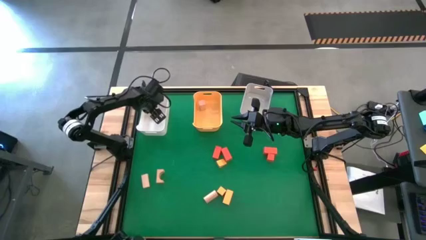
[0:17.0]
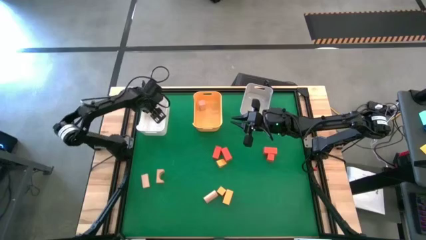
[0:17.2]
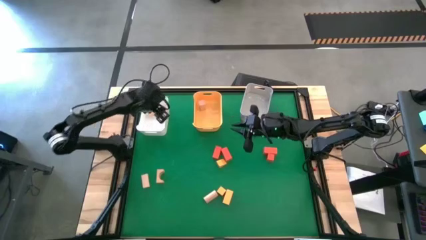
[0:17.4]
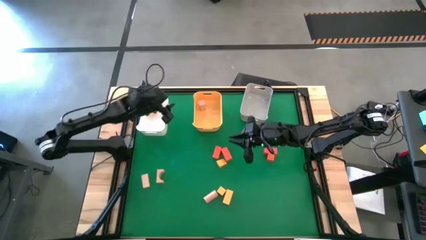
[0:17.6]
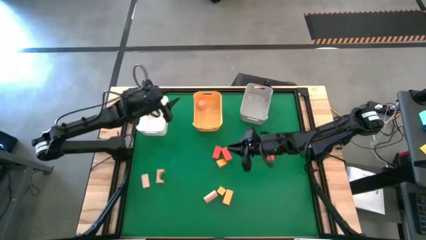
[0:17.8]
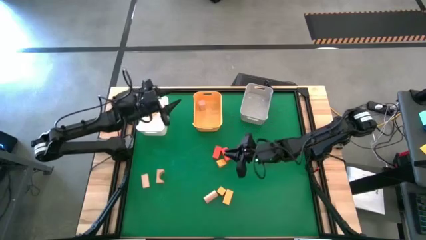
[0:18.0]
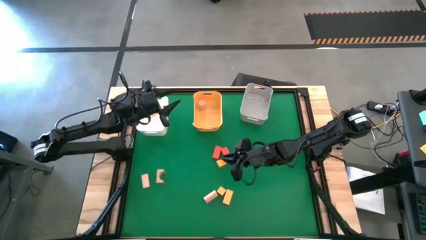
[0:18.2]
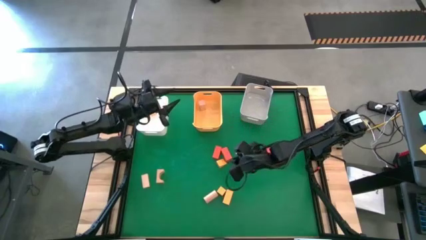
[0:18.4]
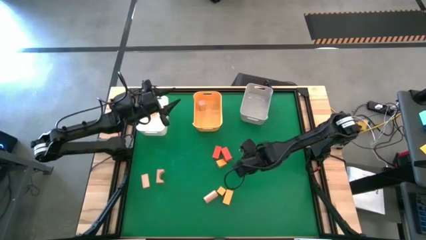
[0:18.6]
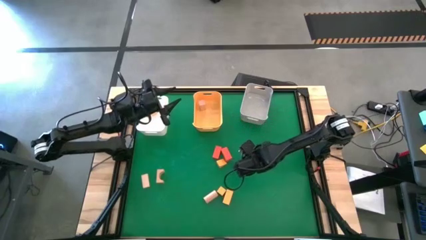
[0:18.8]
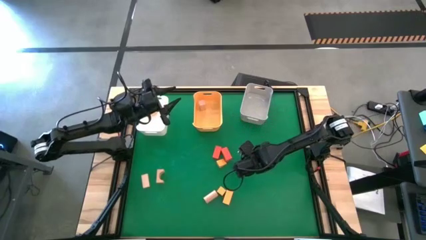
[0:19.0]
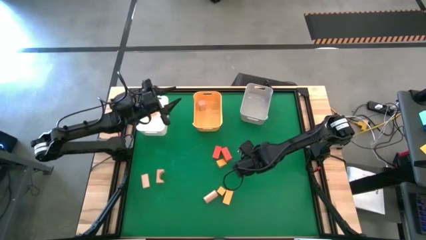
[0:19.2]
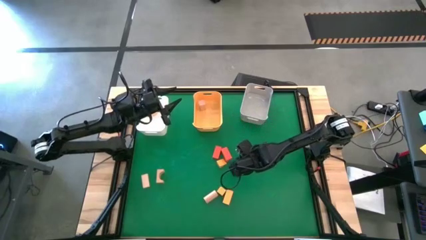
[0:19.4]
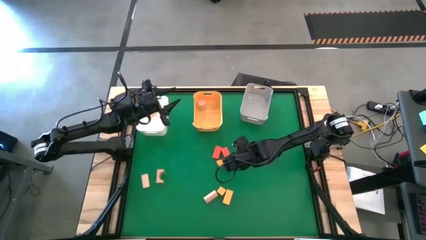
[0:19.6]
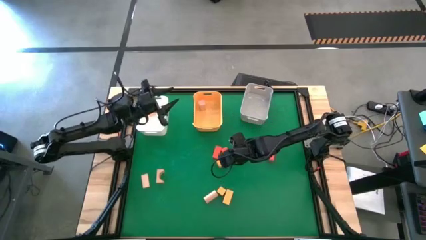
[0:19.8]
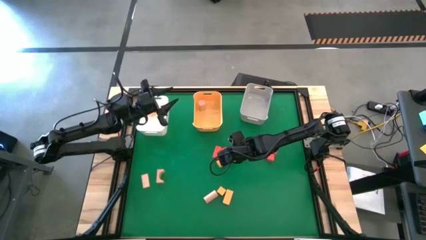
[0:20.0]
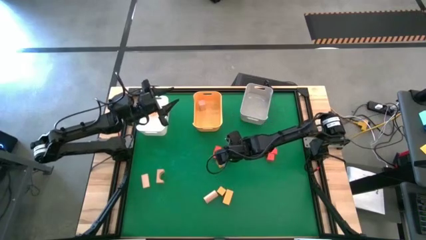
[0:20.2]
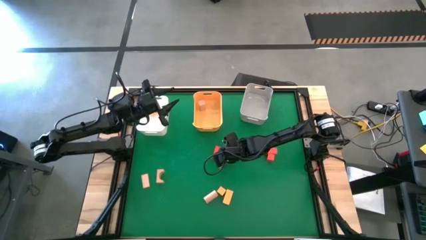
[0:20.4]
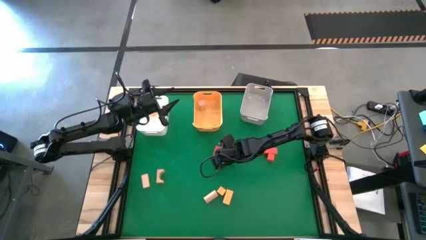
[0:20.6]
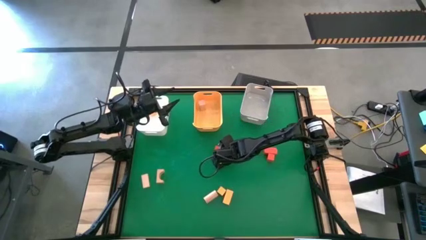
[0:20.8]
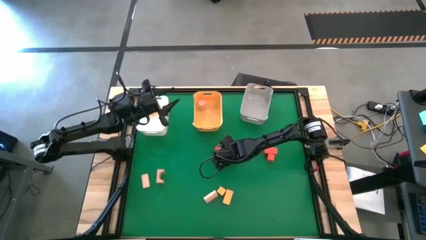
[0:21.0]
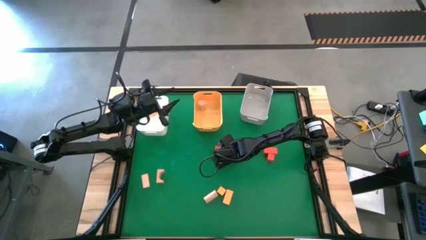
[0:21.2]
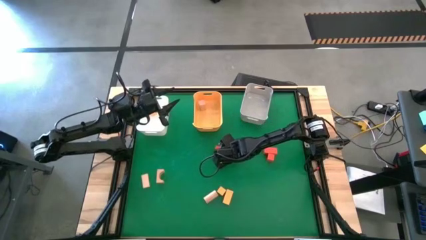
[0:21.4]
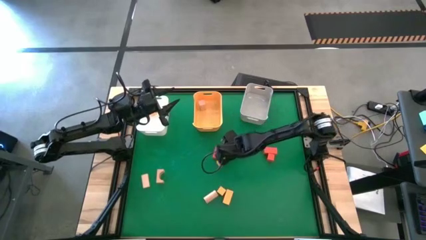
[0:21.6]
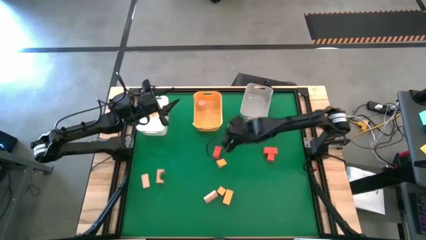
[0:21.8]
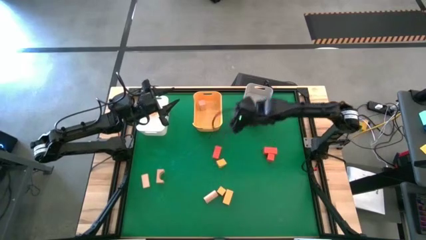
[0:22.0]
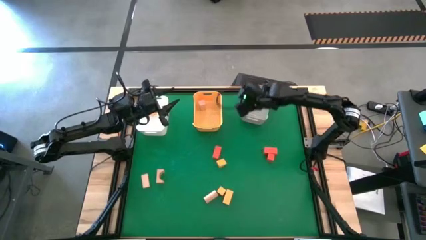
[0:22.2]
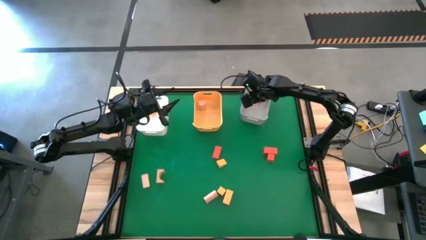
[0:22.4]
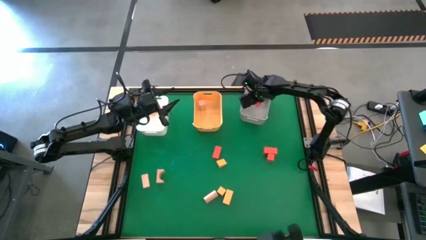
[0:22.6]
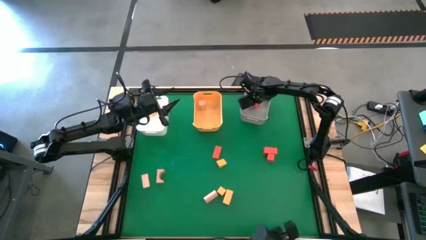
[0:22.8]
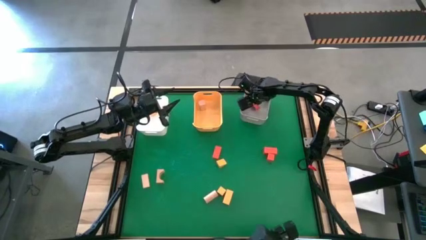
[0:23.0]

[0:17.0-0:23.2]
Task: Sort & place blocks by color
Put the orange block into the light gray bin

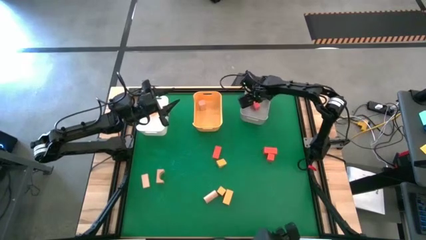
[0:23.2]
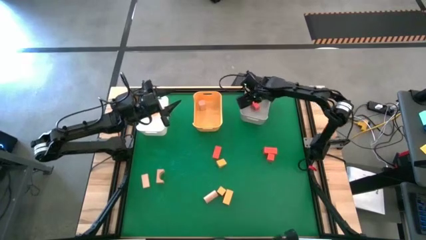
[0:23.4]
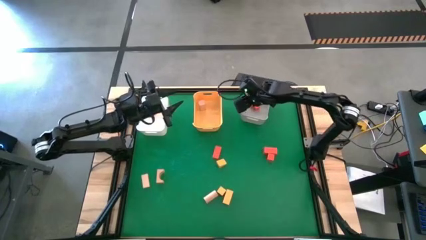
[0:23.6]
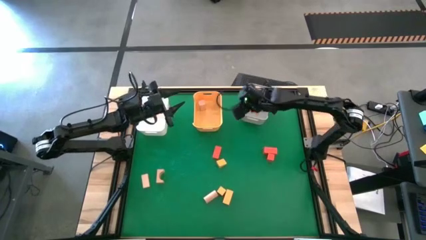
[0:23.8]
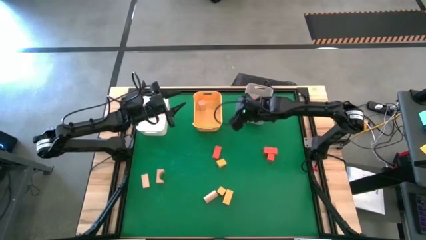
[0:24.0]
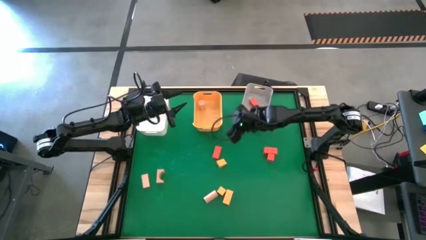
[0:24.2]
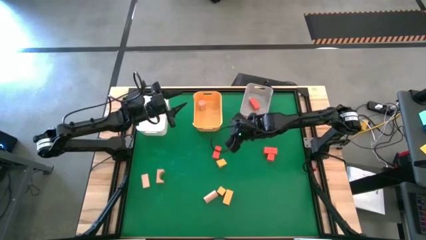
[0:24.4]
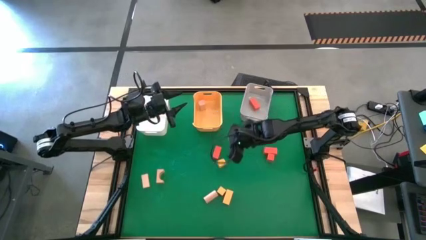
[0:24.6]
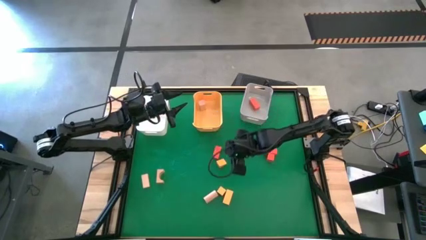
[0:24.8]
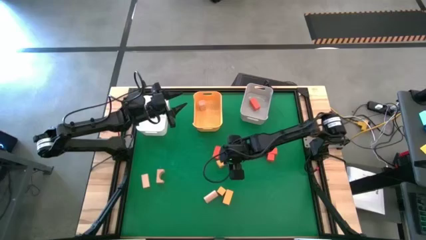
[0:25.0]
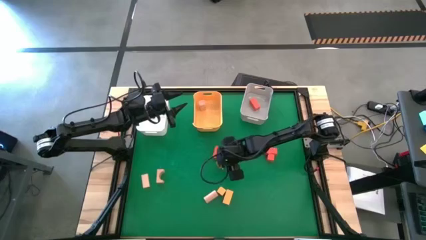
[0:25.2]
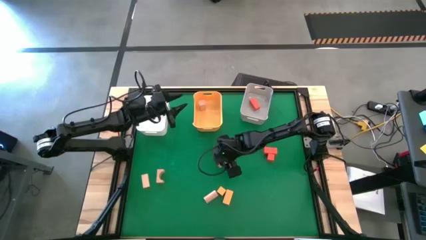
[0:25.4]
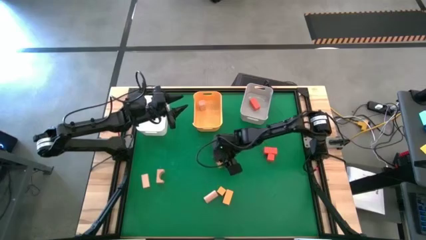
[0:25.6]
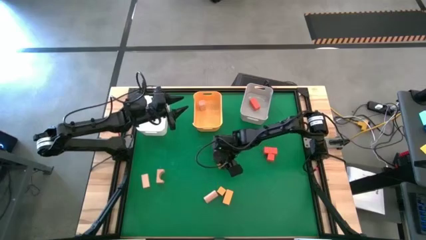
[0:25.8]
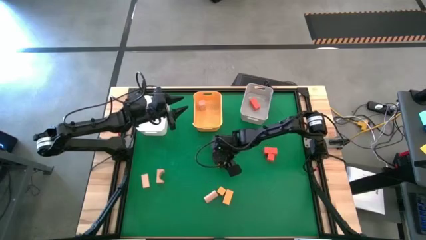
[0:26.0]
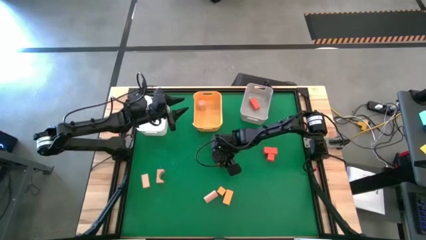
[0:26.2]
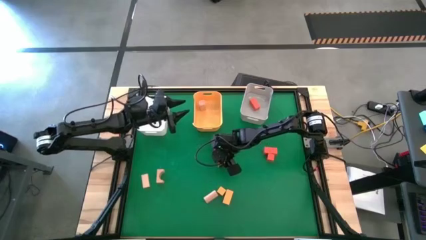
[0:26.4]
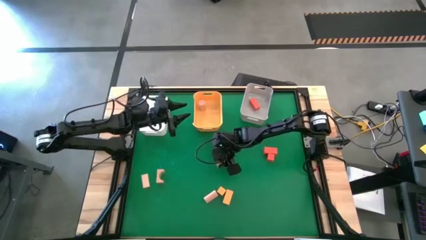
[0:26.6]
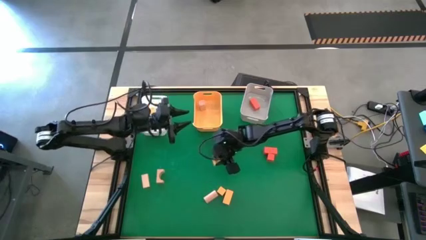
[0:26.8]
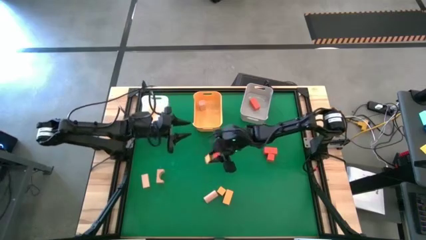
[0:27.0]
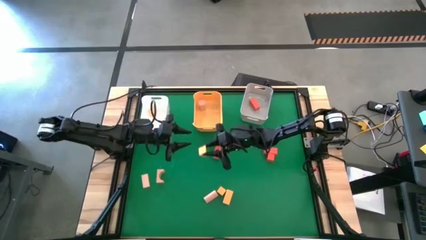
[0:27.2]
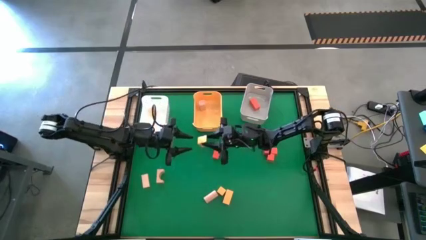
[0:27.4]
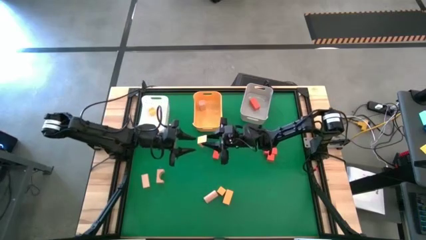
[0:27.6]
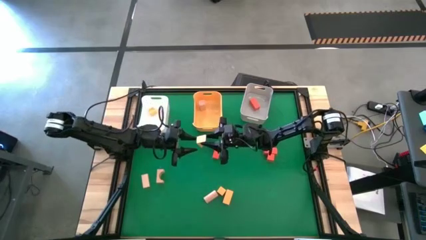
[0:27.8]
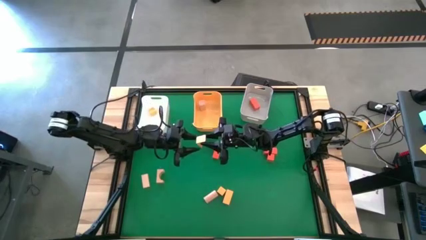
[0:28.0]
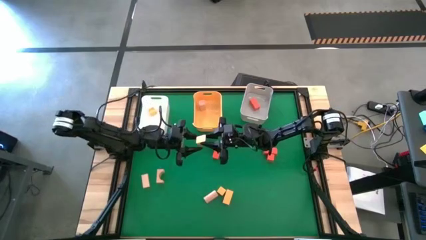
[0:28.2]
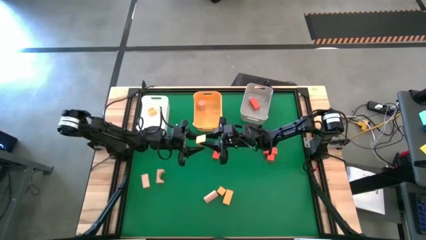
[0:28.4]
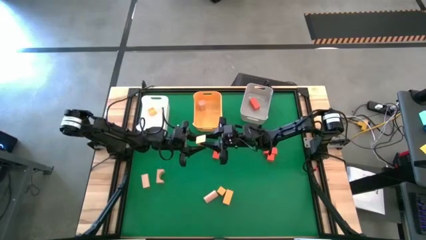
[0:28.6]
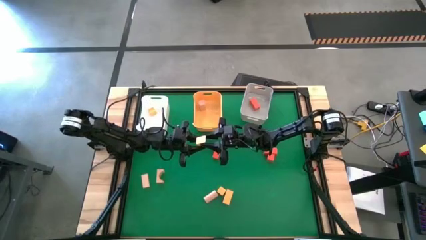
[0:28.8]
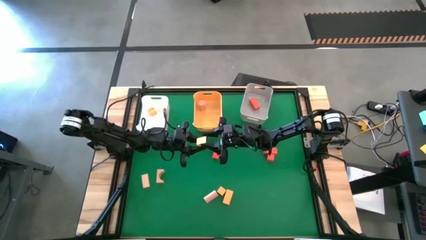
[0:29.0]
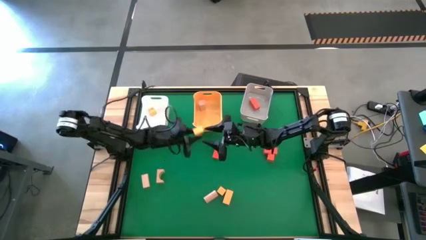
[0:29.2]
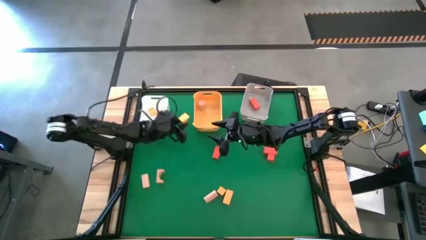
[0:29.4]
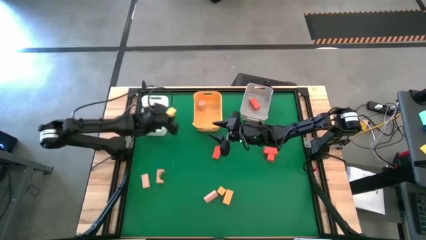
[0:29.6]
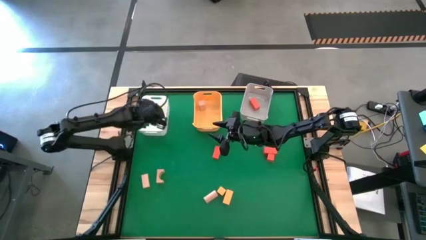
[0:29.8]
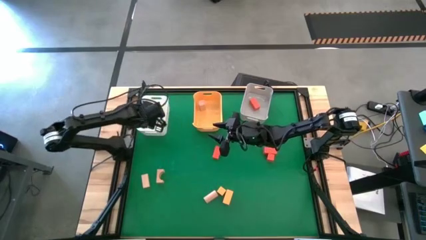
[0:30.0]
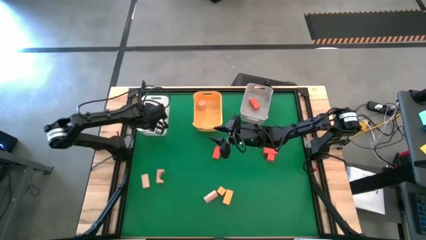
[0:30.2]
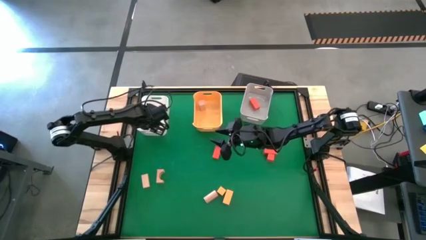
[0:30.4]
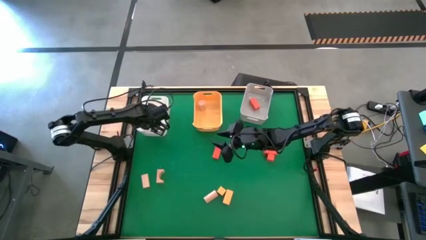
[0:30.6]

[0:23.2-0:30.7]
Put the yellow block into the white bin

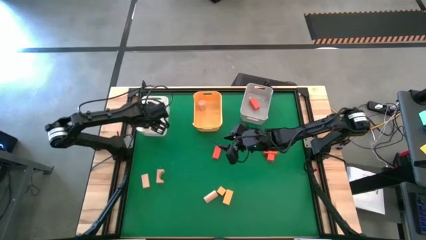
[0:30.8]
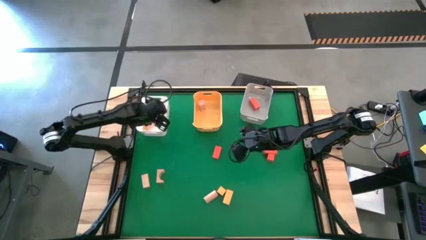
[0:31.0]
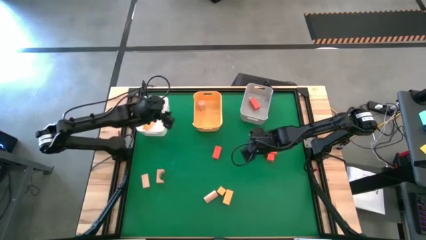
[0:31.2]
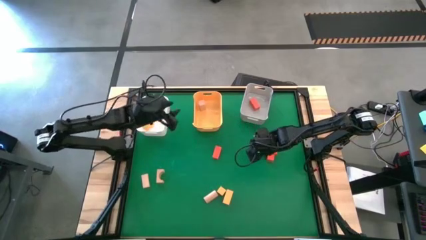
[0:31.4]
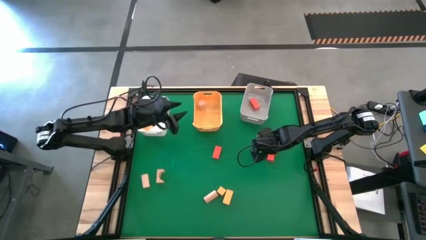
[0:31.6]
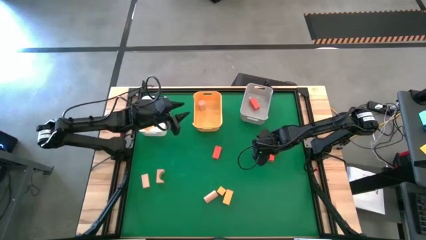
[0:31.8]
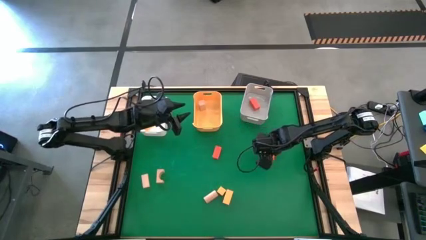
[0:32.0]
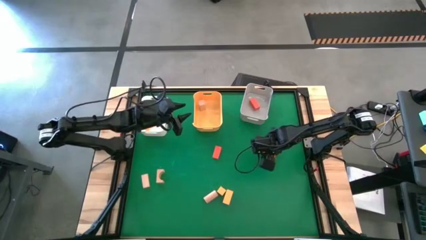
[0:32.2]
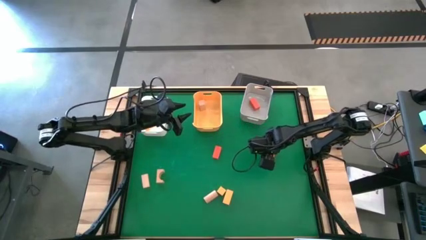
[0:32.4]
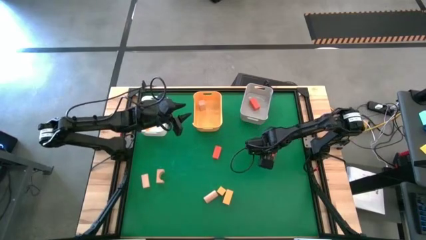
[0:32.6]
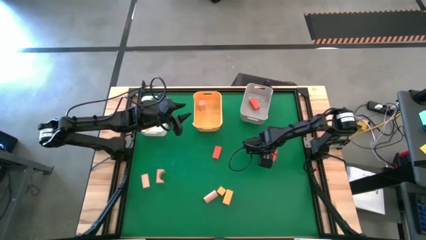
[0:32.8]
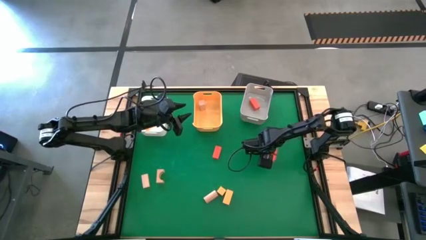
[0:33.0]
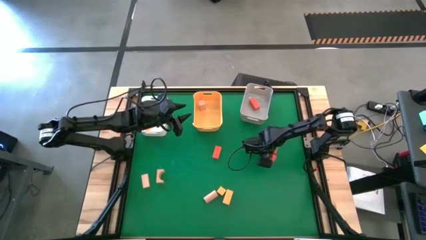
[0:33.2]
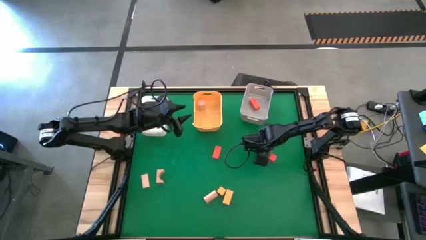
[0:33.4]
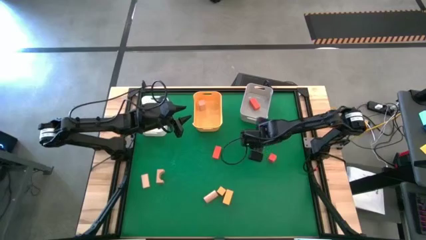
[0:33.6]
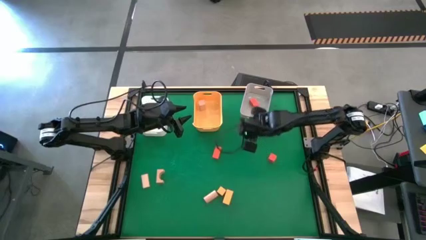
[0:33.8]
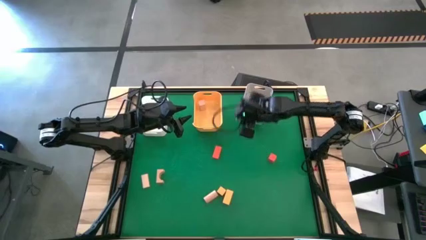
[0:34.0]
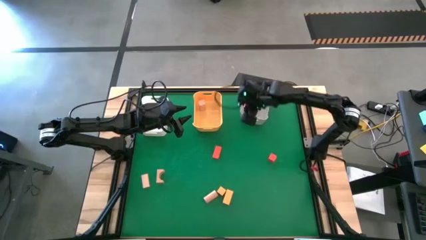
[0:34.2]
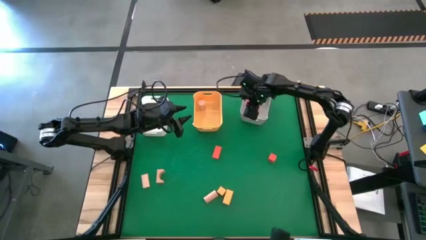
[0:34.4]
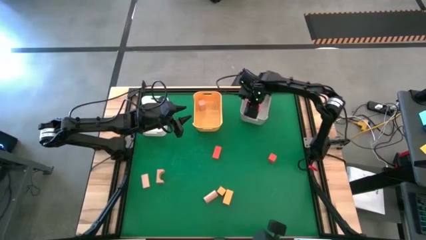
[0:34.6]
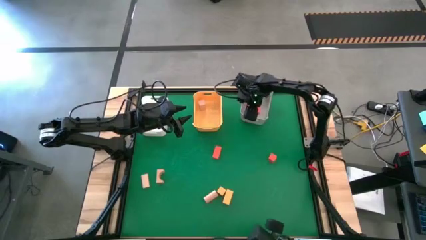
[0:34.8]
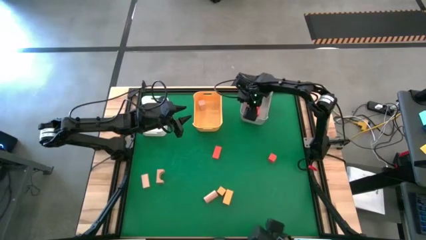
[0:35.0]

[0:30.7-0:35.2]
Put the orange block into the light gray bin
